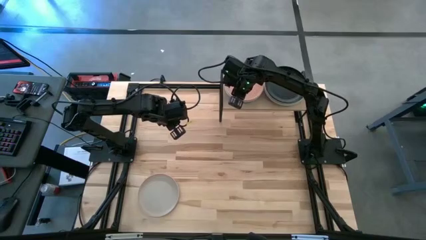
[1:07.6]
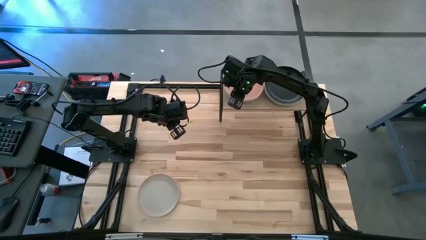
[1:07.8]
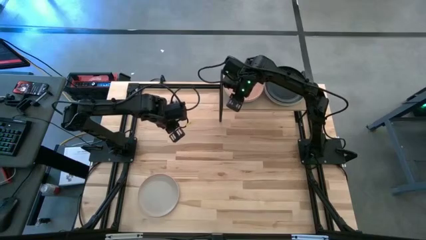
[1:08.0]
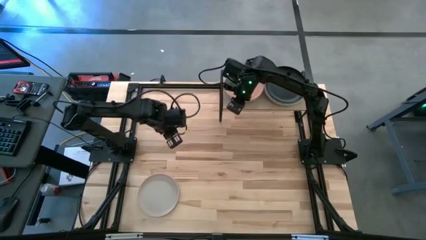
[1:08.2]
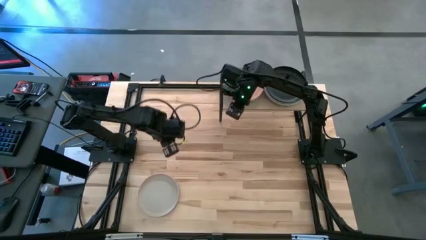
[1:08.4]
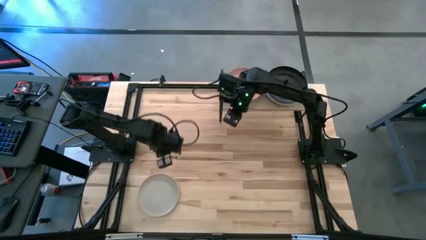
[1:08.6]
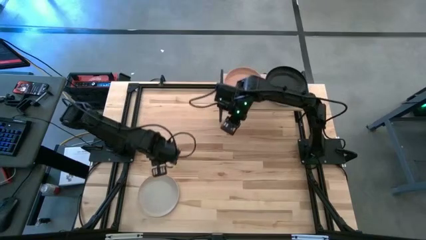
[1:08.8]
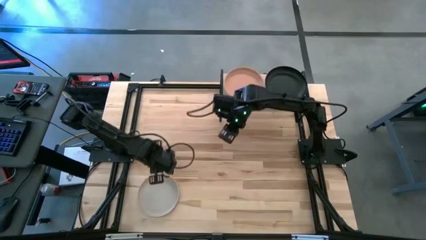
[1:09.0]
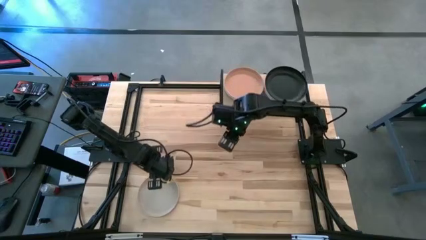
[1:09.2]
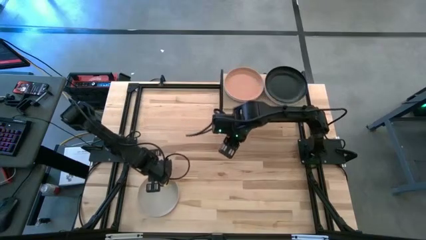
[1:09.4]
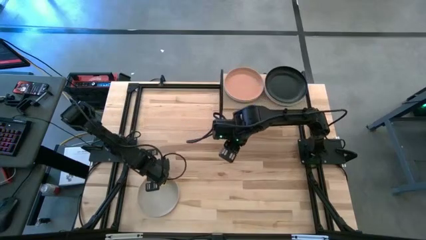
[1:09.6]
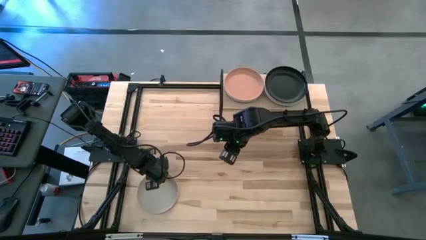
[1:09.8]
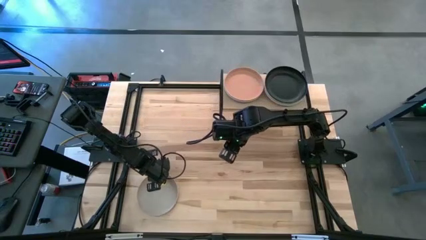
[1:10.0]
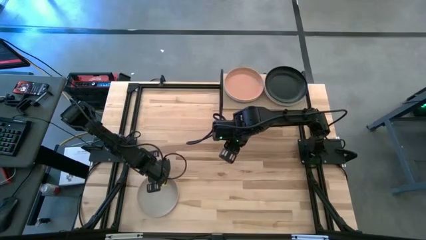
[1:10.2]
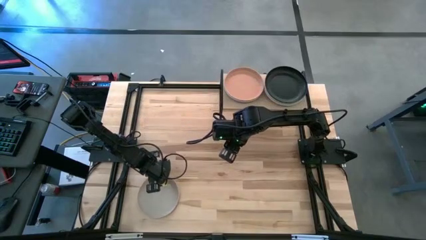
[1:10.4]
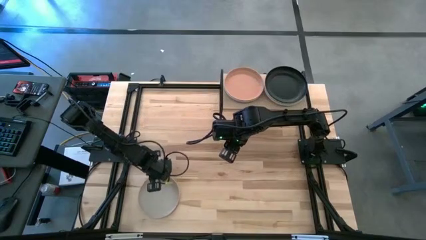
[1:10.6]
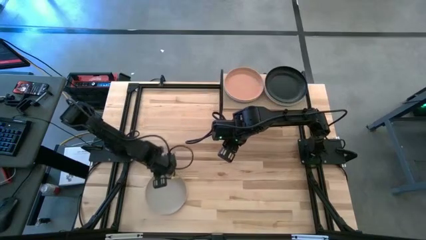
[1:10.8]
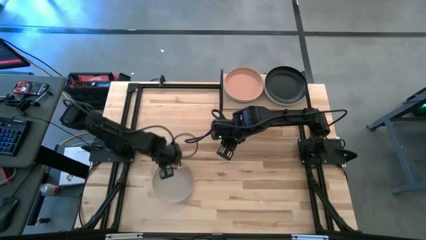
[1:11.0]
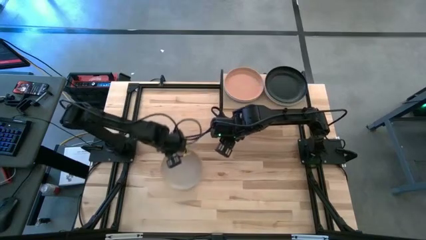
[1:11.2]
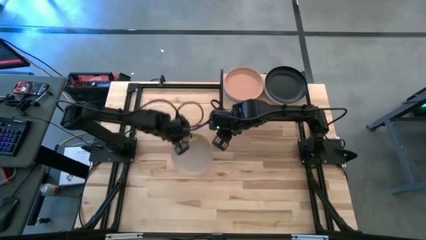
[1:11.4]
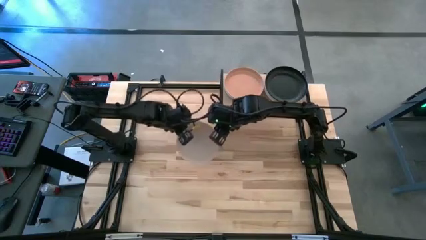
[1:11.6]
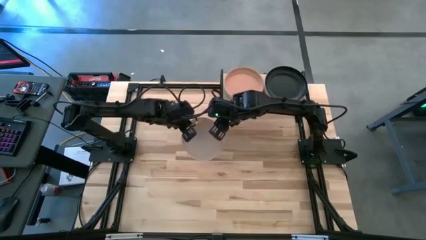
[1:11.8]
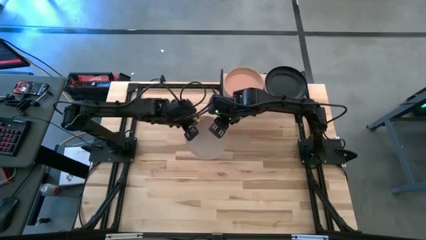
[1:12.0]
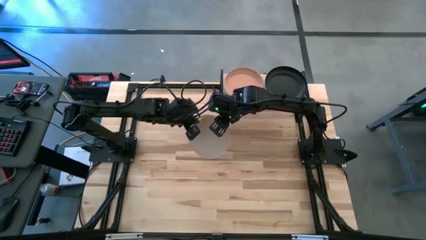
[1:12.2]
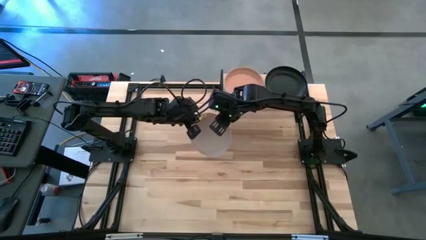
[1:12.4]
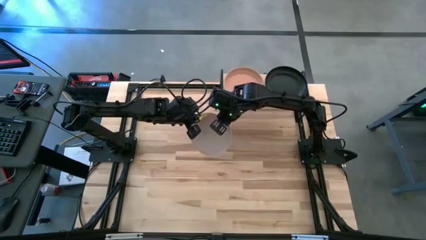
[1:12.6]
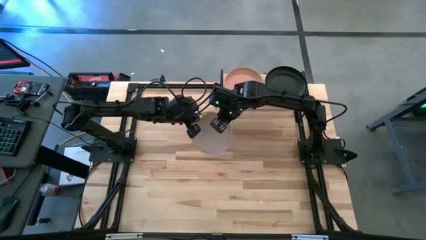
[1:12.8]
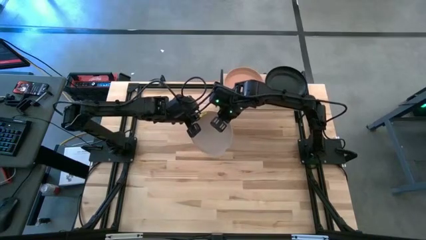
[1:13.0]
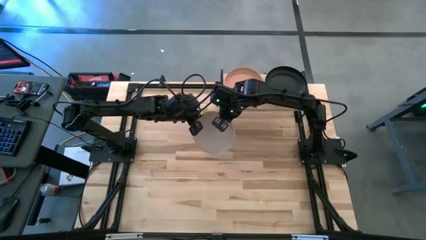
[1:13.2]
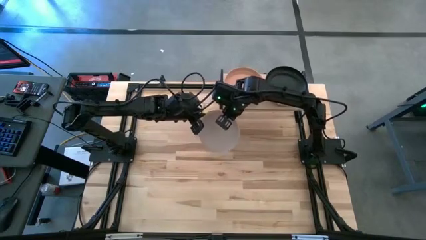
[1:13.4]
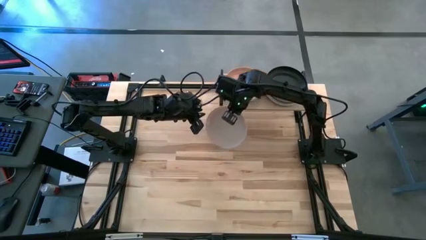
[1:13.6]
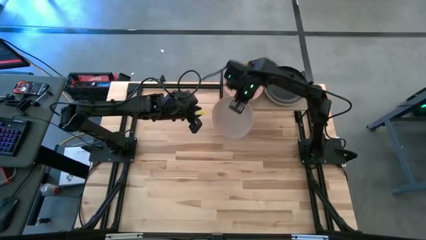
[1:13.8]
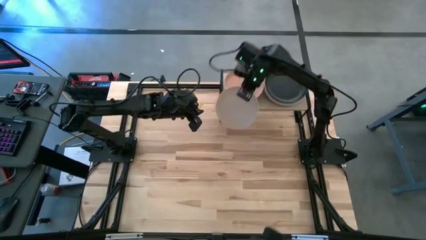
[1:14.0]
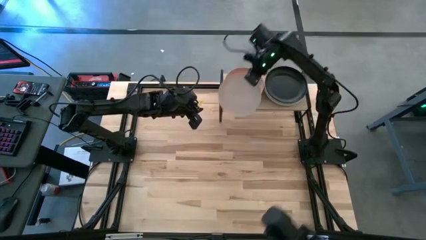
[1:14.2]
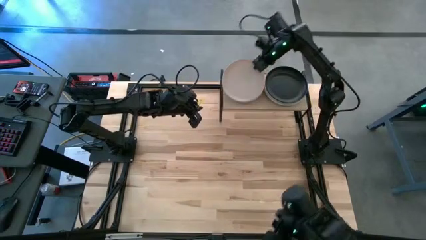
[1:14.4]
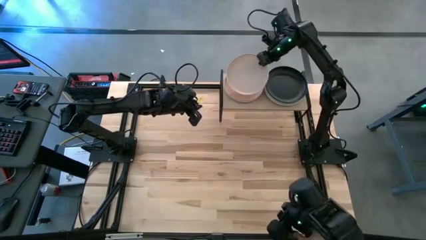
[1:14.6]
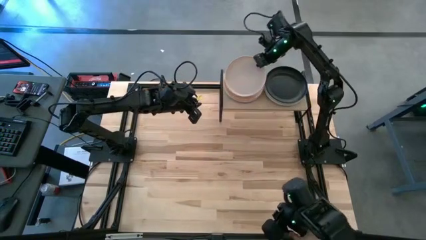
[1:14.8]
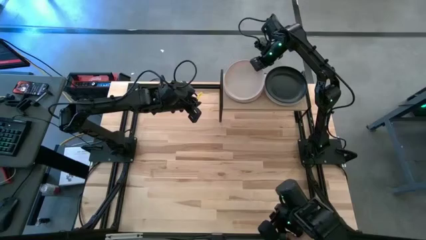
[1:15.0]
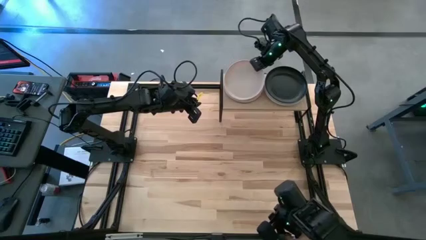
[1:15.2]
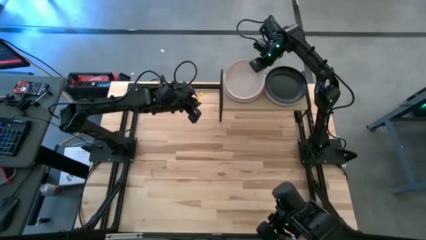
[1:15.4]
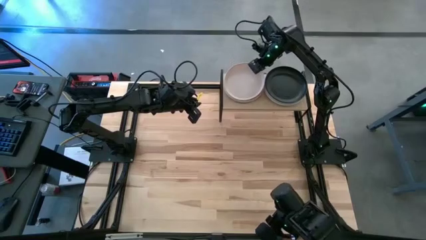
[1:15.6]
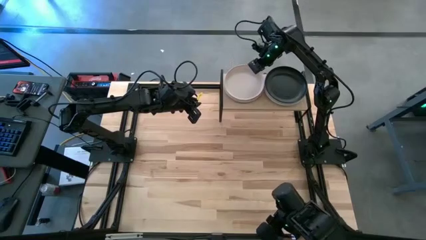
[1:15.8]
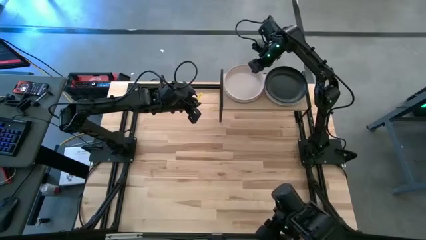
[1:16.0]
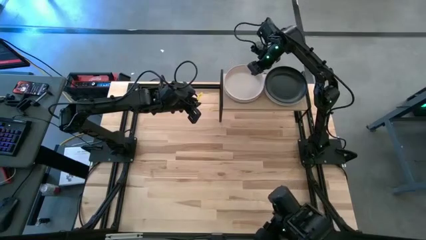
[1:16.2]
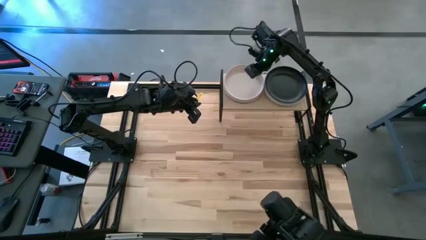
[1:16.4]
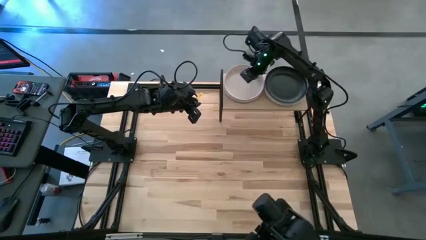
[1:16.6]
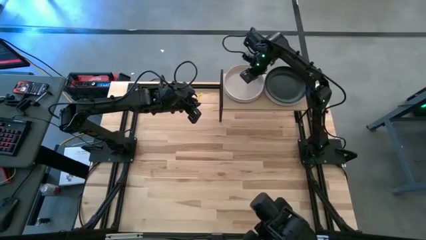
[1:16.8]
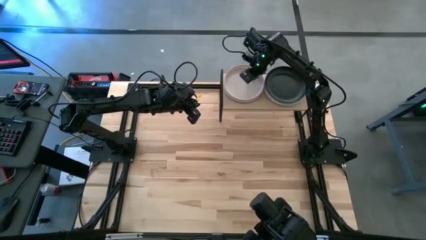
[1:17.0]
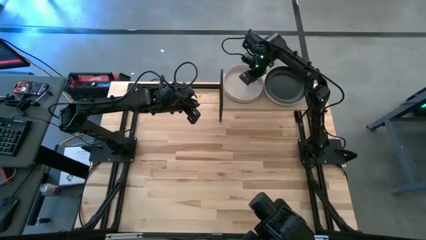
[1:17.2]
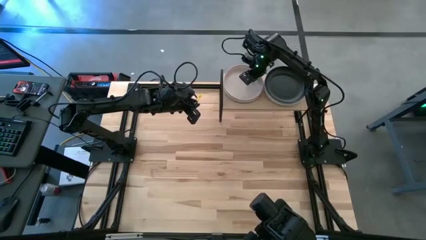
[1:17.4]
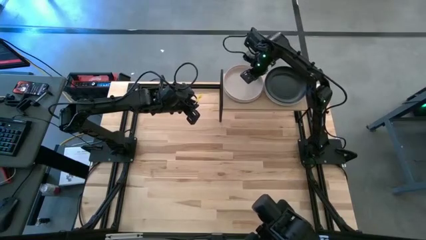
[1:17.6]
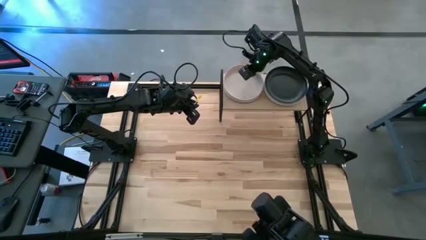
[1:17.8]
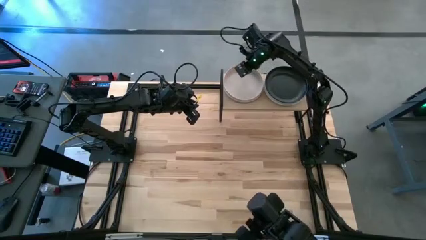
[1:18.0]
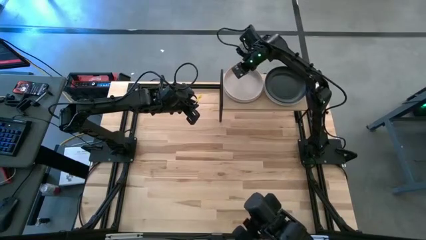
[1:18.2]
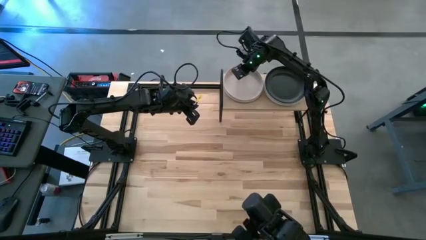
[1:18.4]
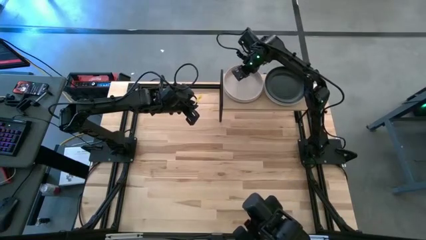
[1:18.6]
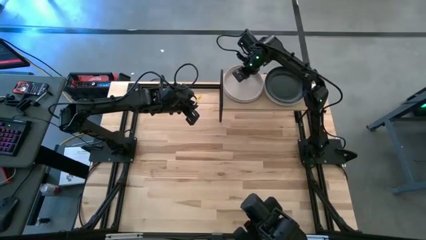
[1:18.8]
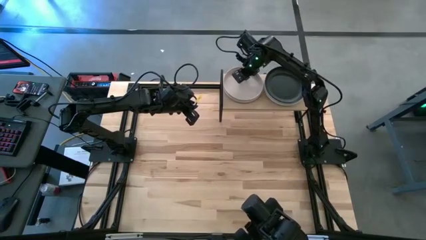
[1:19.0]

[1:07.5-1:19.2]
Task: Place and stack plates onto a shelf
Stack the gray plate on top of the brown plate on the shelf

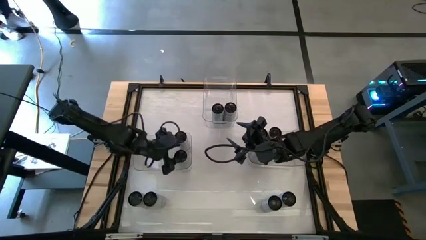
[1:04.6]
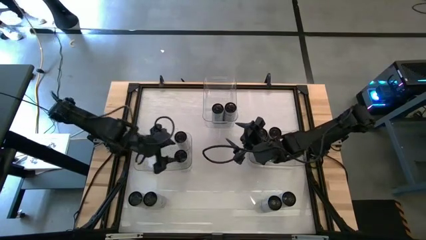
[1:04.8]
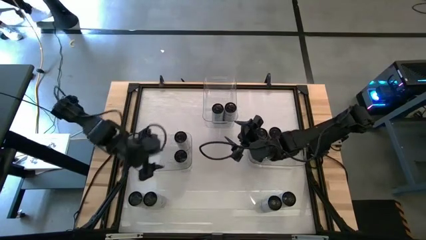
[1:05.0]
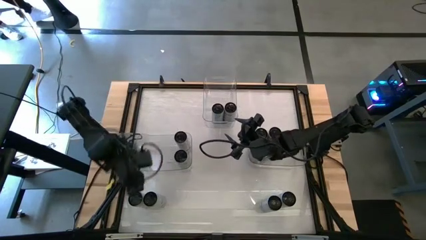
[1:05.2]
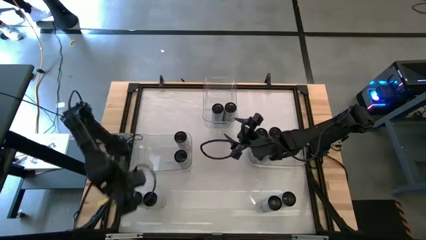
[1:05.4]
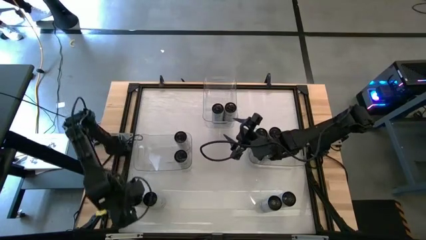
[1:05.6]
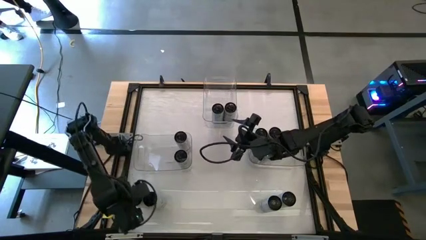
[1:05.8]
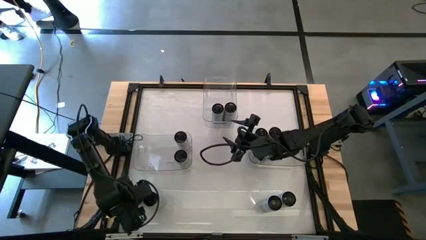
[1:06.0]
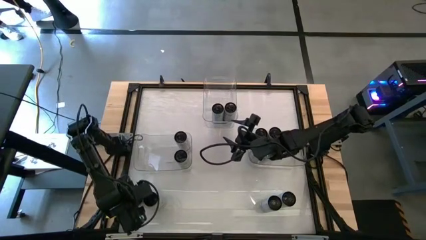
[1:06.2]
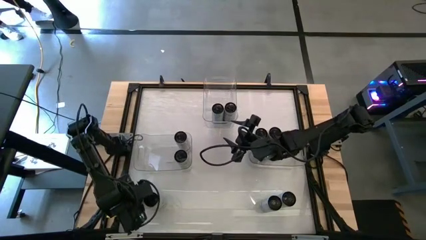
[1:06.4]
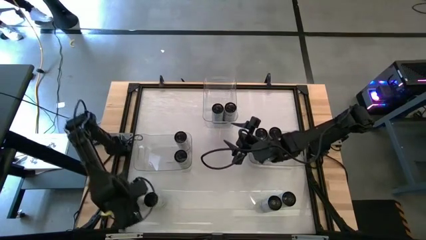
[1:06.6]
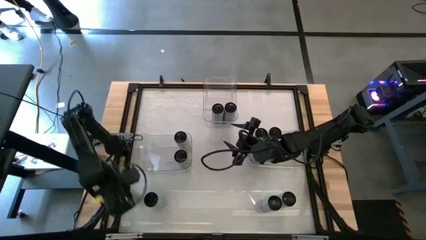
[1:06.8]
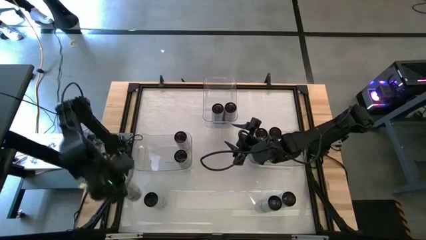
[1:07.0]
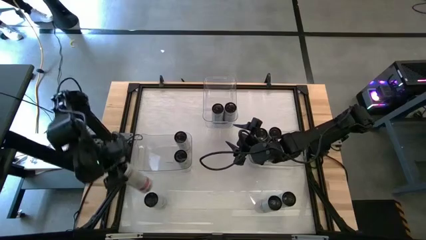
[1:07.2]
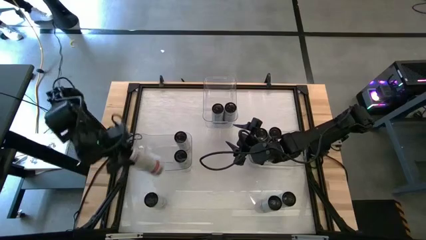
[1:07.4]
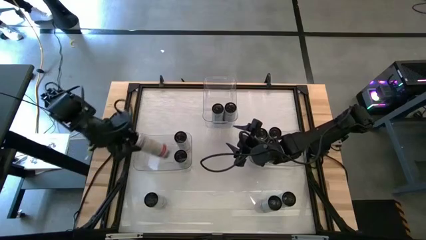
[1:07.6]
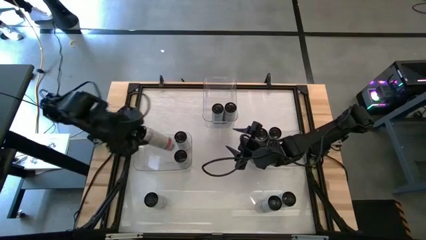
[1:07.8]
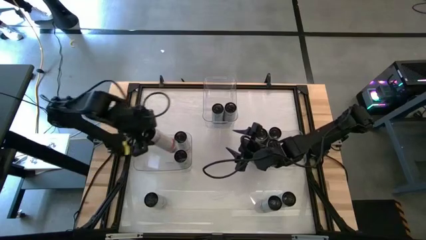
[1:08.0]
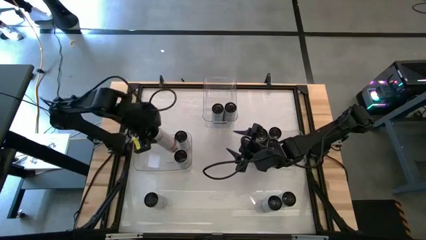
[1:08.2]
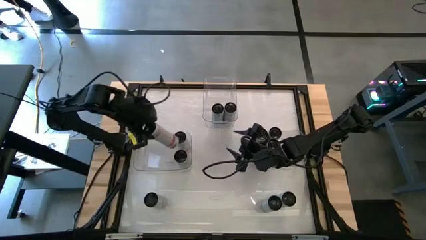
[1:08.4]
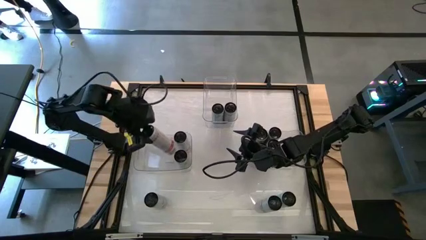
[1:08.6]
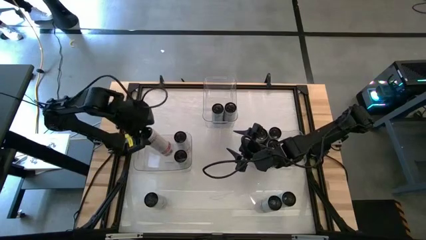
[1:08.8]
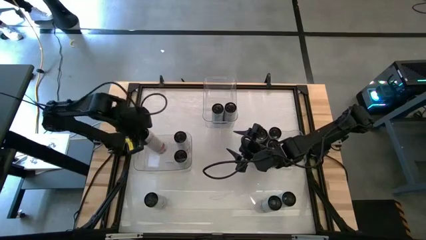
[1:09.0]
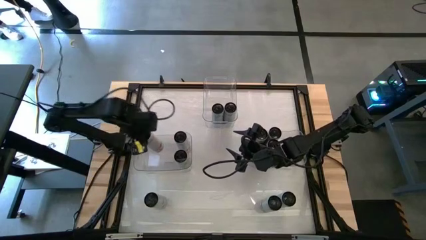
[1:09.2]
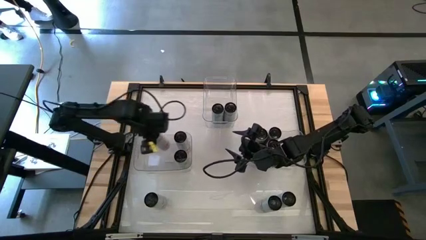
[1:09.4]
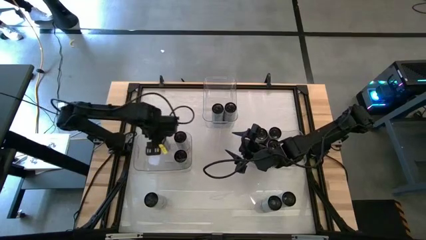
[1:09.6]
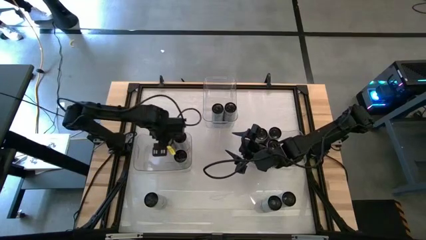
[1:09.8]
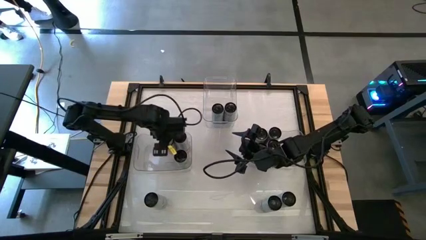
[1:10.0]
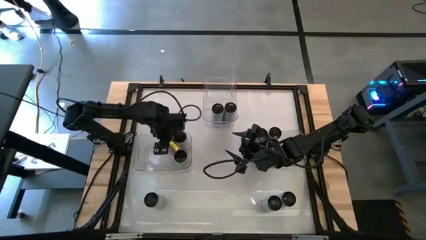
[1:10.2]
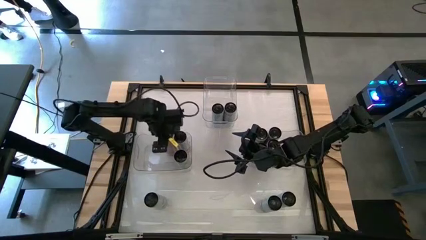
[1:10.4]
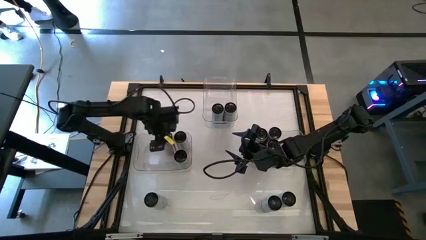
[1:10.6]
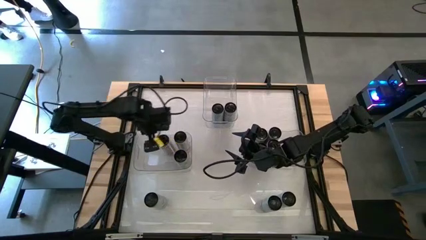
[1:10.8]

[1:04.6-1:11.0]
Task: Sort soda cans
Put the left white-pink soda can into the bottom left transparent bin
